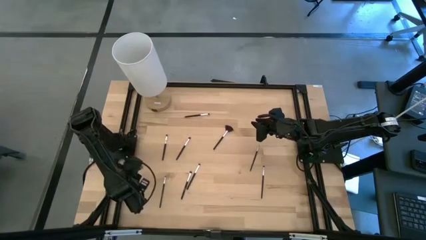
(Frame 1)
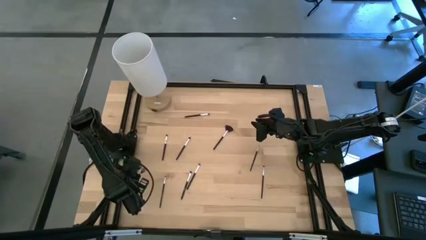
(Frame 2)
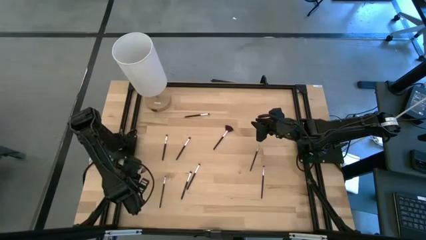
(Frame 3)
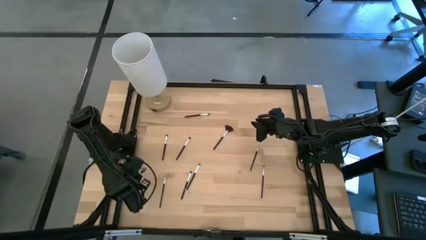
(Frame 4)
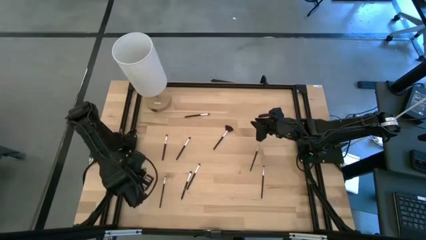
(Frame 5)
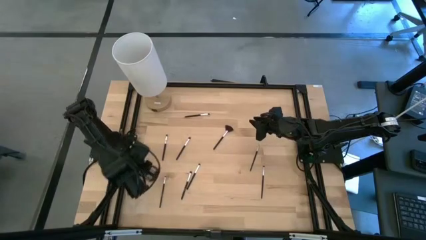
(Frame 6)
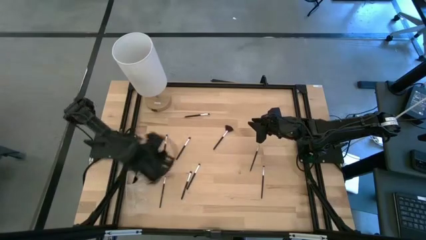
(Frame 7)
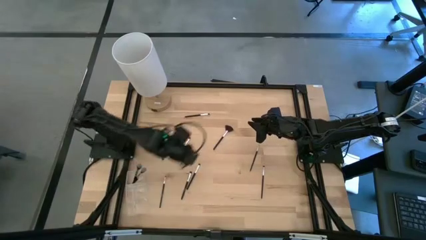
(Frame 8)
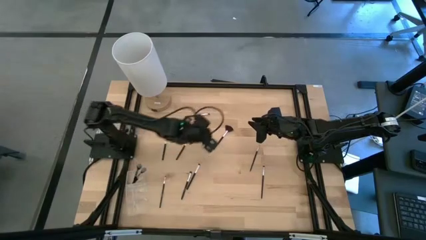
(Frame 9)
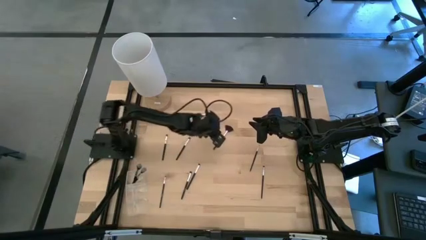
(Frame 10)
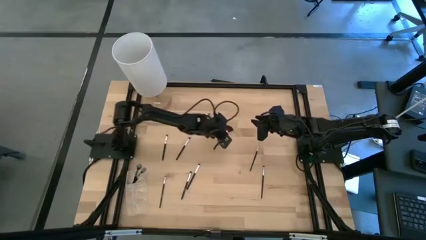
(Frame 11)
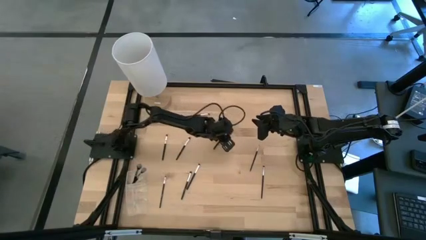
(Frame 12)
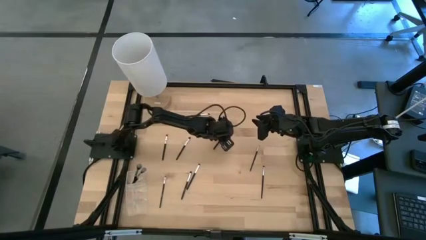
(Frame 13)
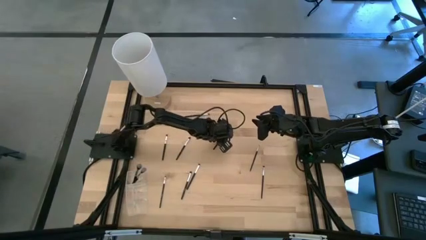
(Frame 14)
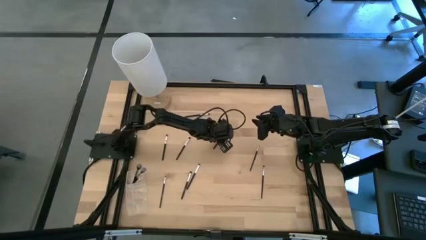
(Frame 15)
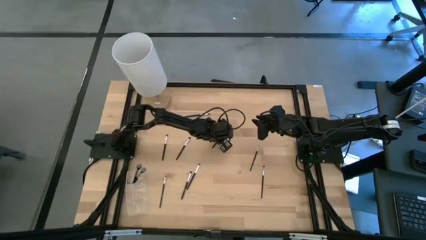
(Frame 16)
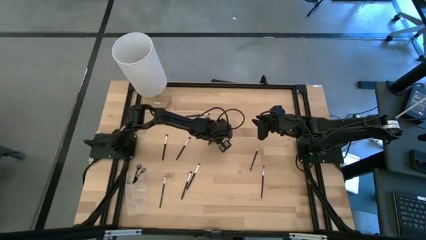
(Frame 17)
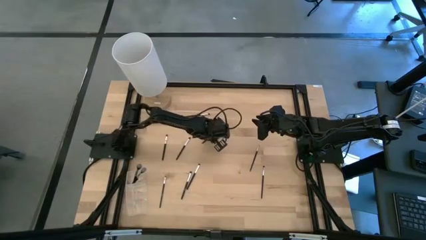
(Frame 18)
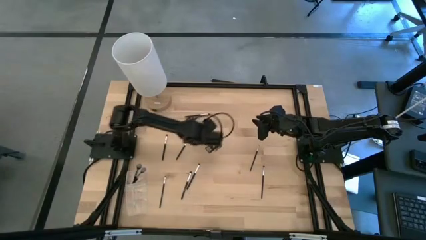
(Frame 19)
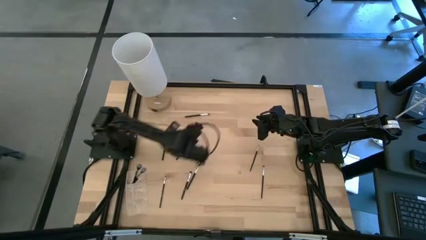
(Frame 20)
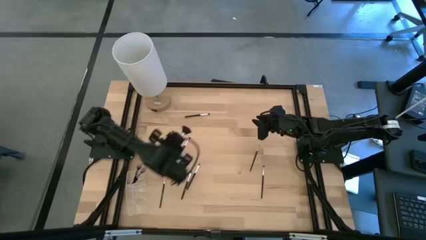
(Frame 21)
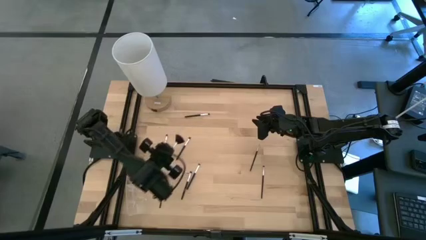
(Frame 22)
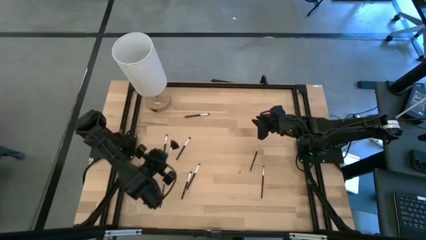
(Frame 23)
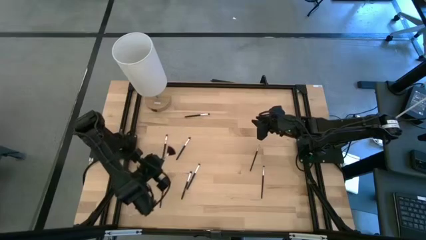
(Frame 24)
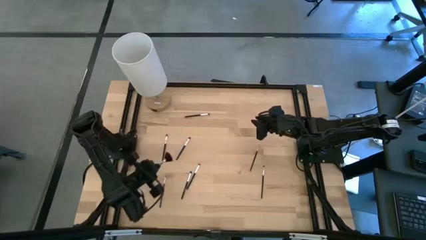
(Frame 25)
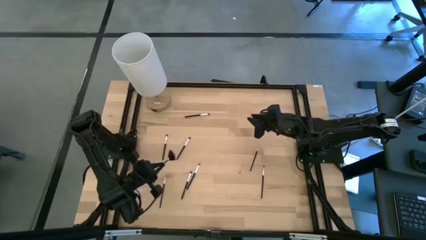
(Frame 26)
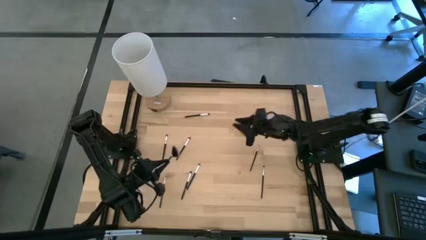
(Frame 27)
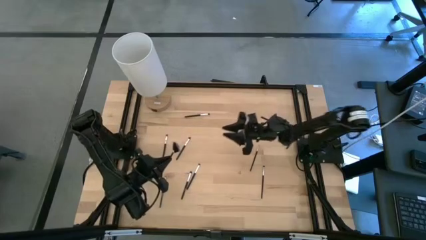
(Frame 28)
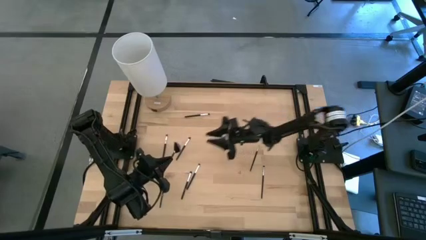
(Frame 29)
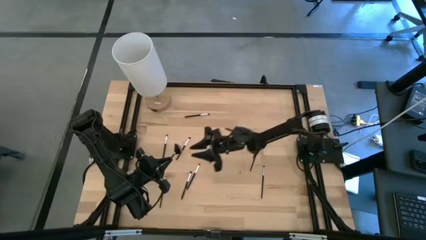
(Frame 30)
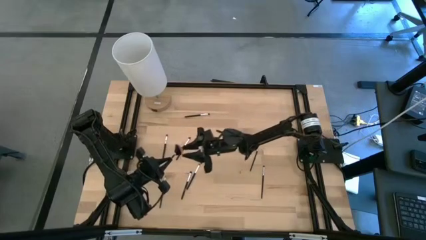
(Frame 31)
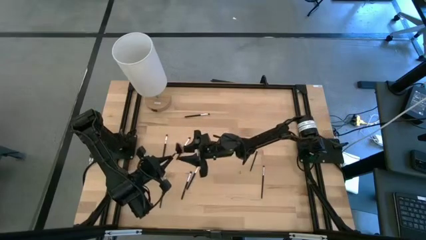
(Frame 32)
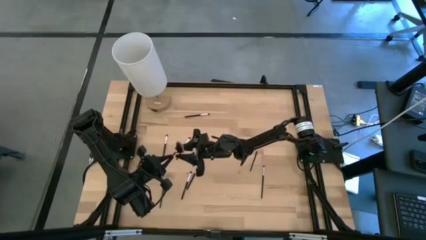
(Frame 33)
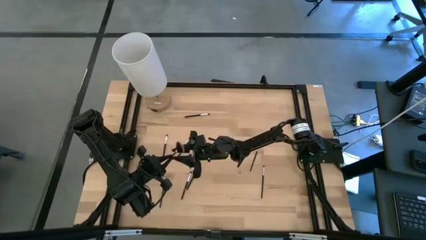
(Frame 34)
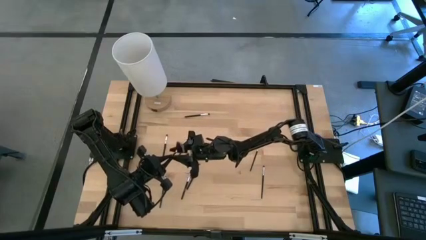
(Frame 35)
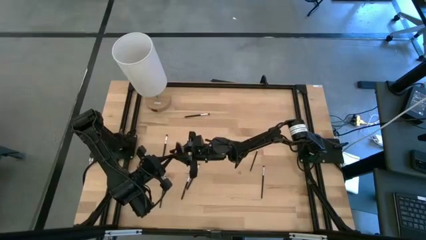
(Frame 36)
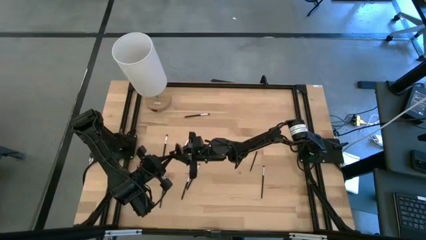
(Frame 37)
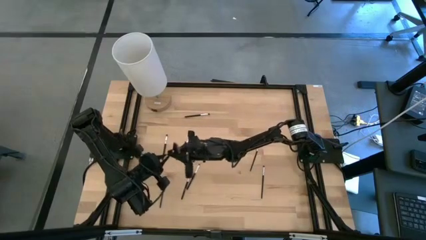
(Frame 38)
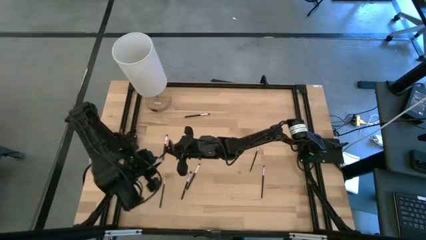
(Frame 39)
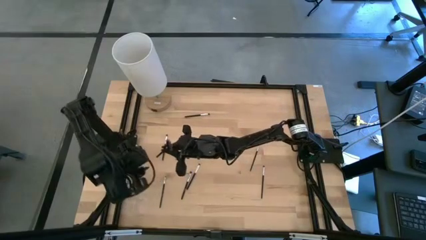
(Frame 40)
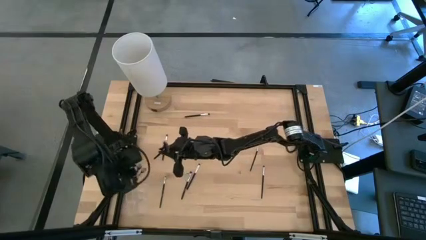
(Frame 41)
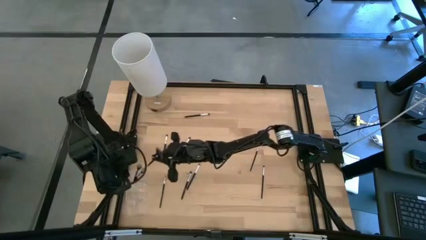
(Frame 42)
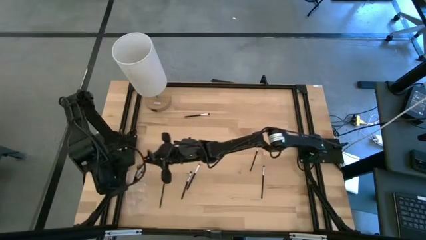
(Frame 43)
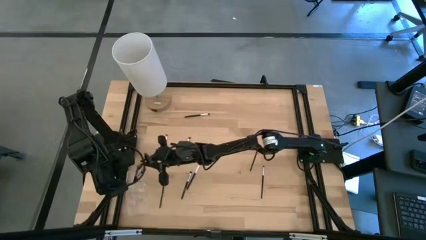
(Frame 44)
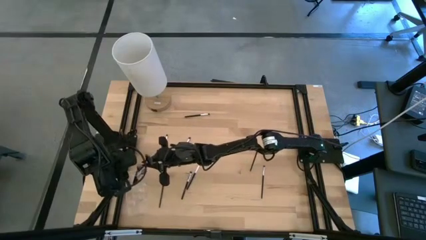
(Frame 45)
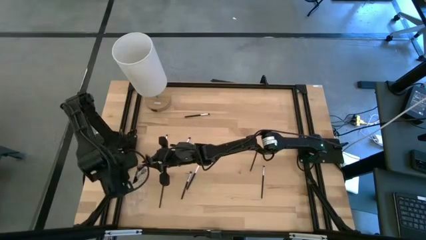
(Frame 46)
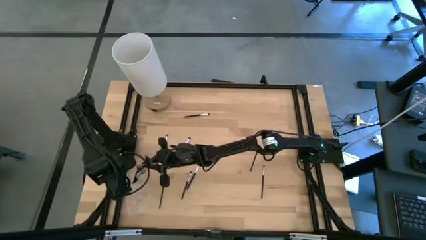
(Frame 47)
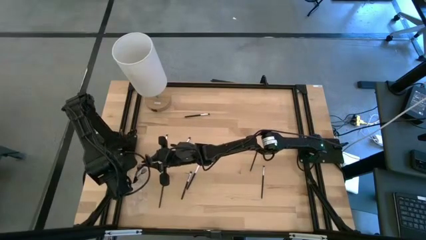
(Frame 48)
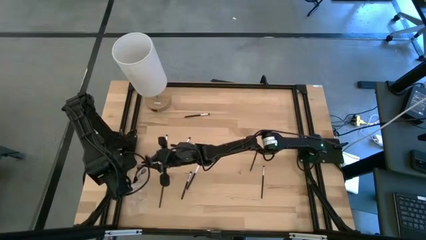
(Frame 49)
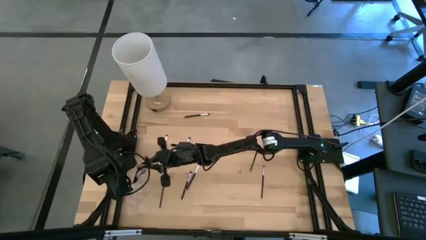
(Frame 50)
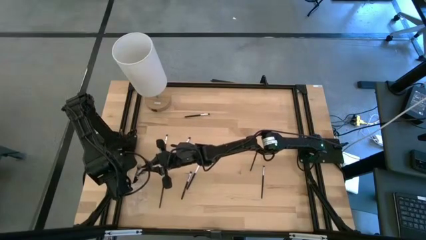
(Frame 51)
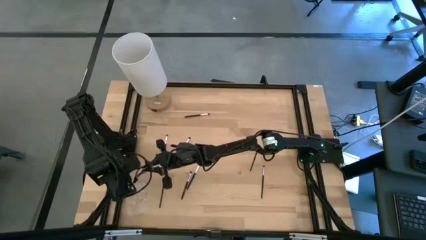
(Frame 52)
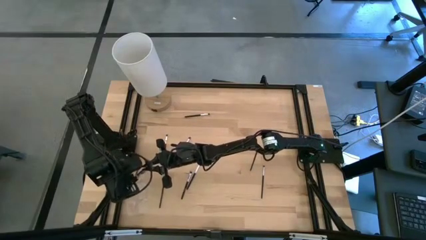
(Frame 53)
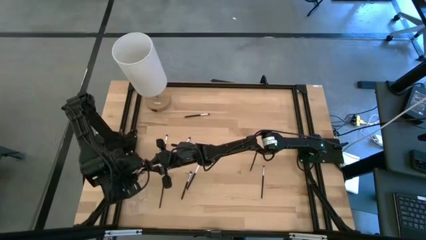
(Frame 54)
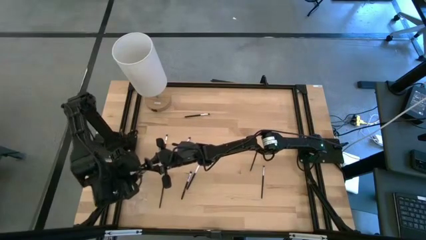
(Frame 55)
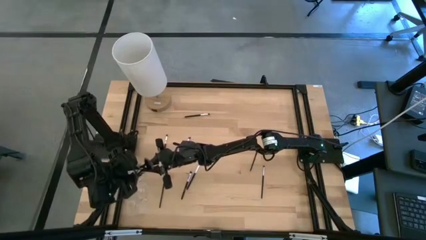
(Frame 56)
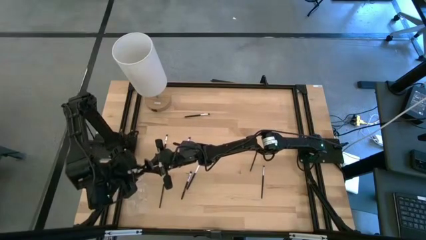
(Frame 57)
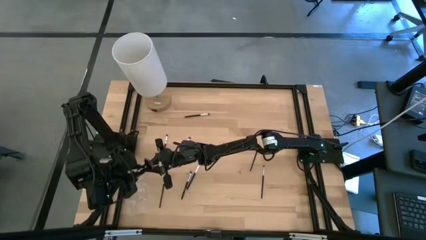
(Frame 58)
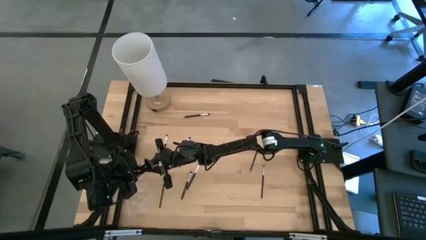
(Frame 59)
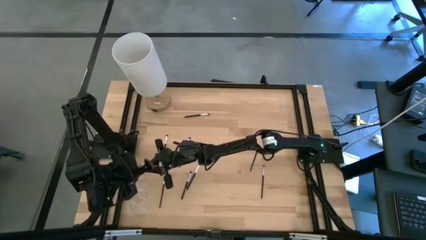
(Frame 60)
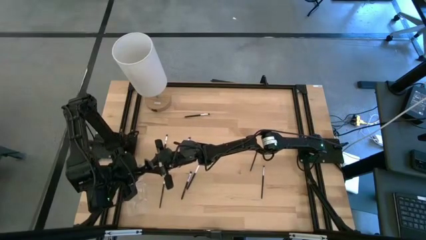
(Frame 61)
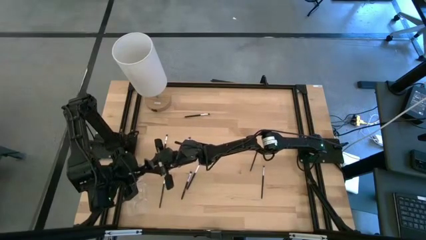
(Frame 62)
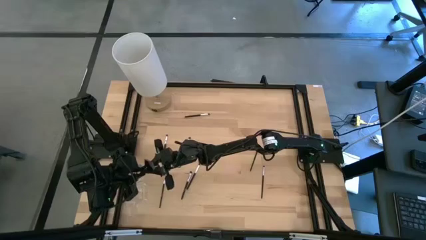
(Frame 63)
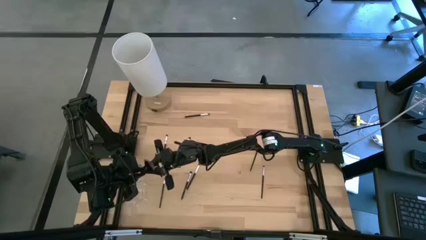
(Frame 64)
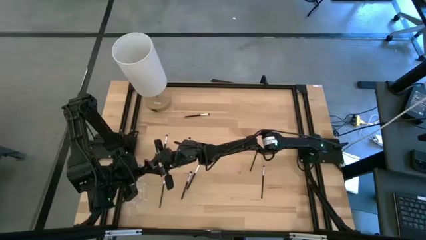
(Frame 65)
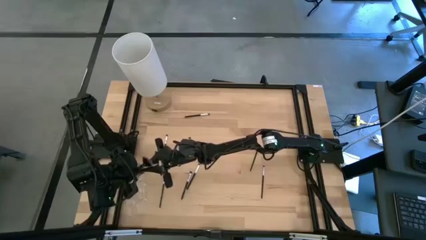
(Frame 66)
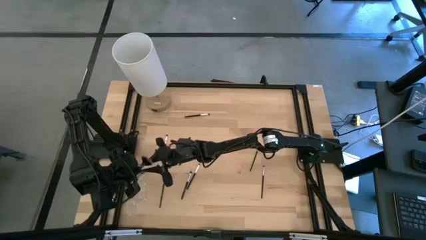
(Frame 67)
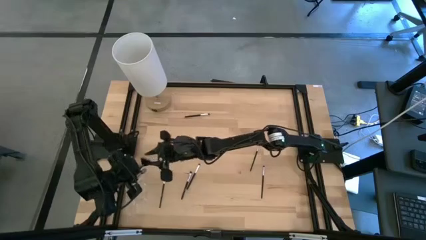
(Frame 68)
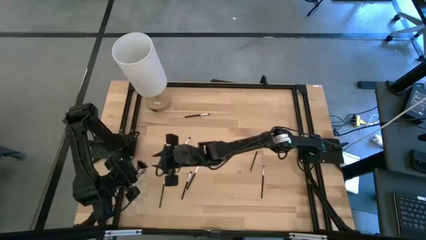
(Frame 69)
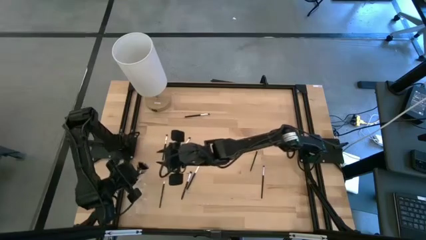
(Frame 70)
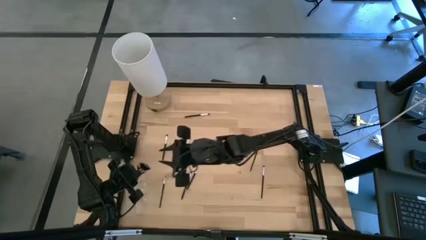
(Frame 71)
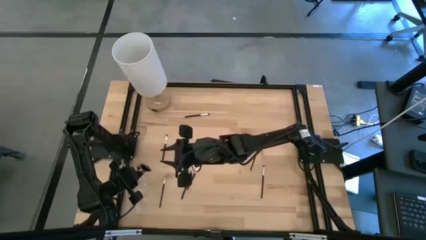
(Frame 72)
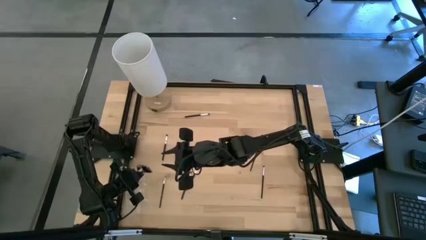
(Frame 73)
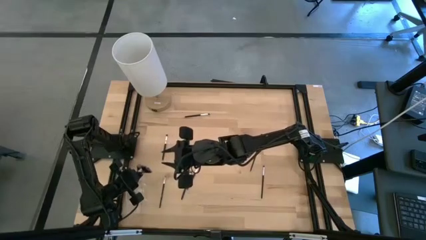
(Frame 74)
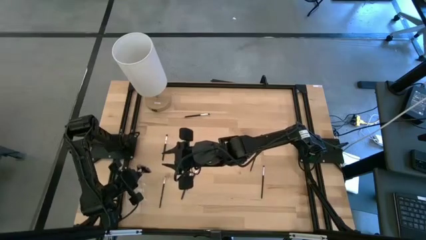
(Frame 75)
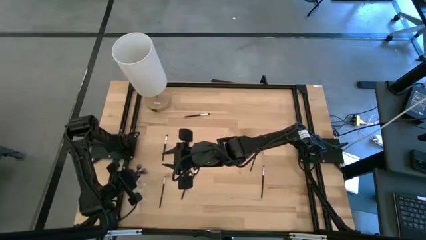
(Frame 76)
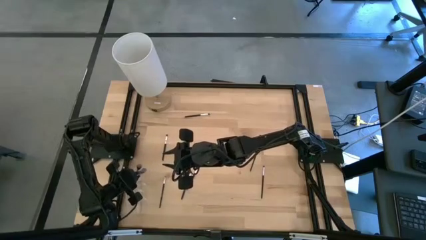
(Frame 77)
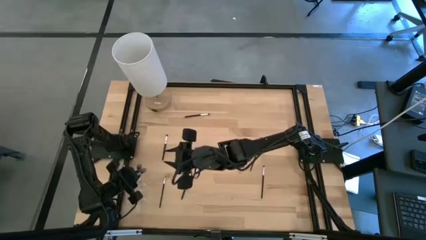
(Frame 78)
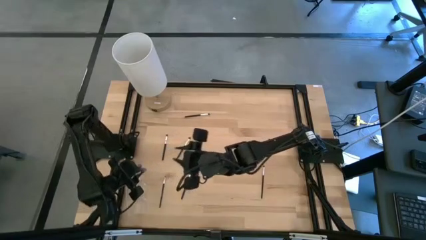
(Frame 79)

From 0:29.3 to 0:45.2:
Task: Pick & Place Makeup Supplies
Put the makeup brush into the transparent organizer
